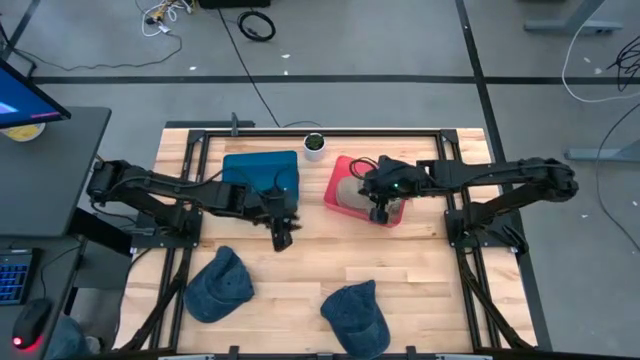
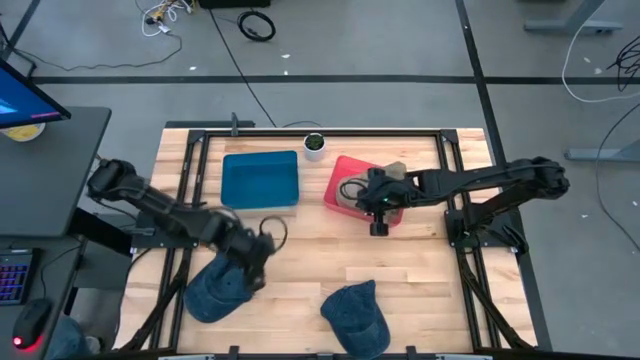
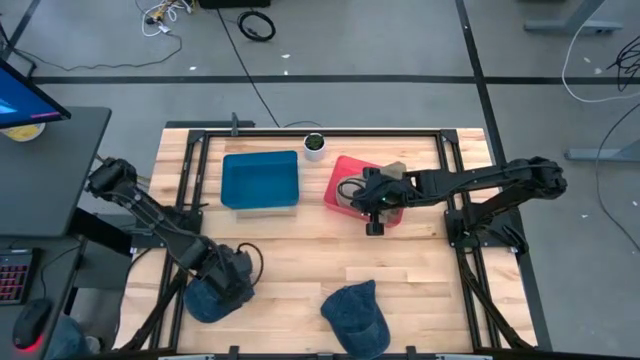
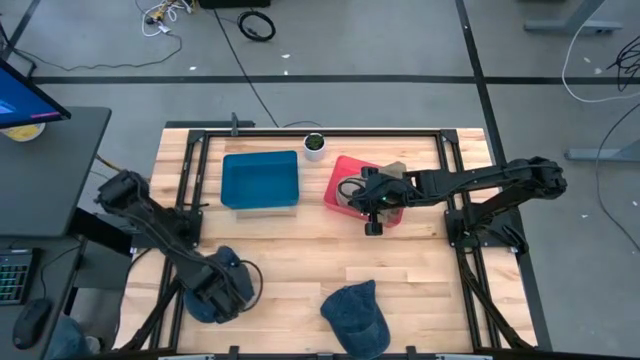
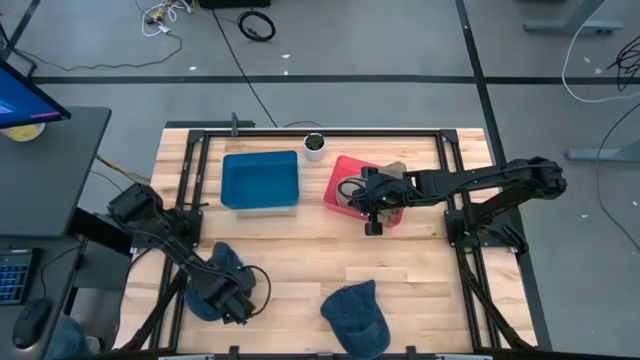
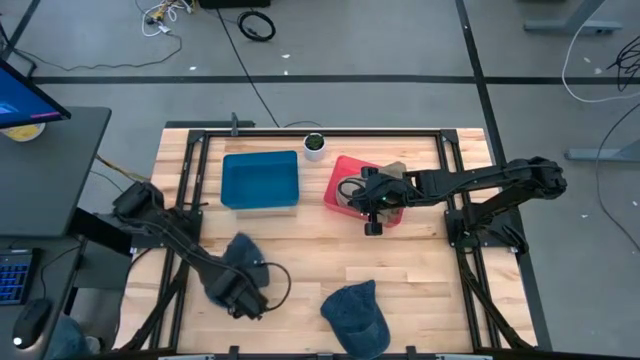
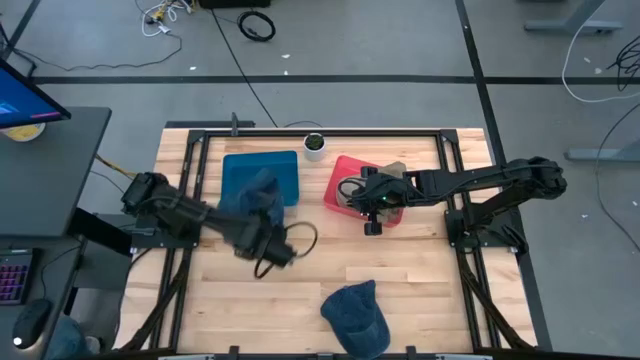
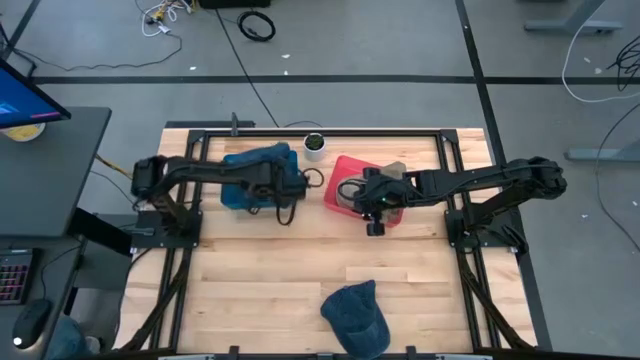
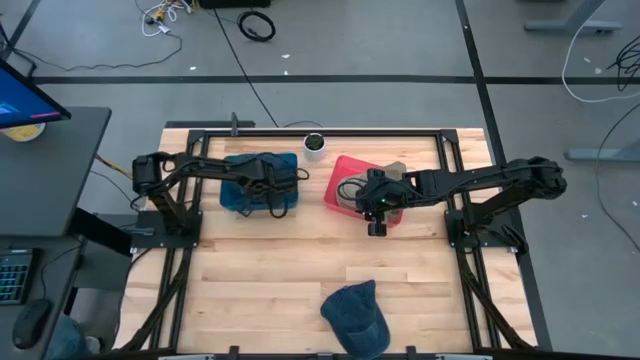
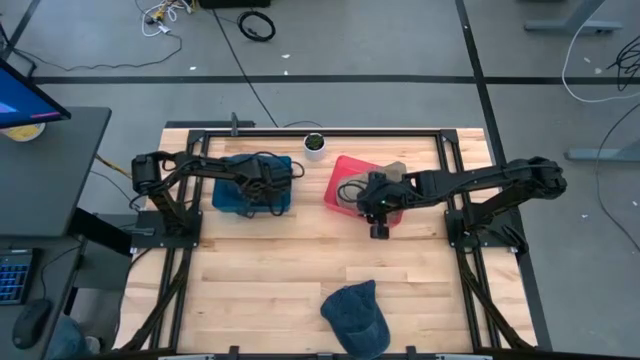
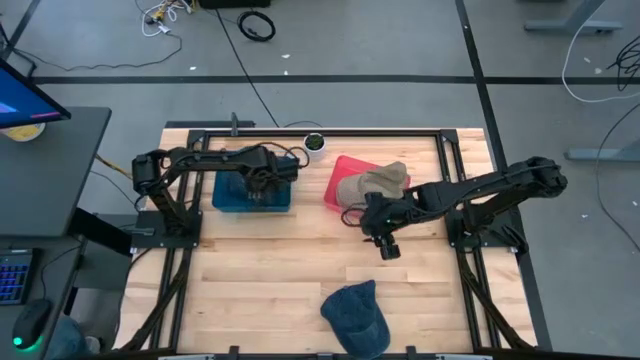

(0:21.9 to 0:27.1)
Task: Pick & Place hat
Put the left blue cap into the blue bin

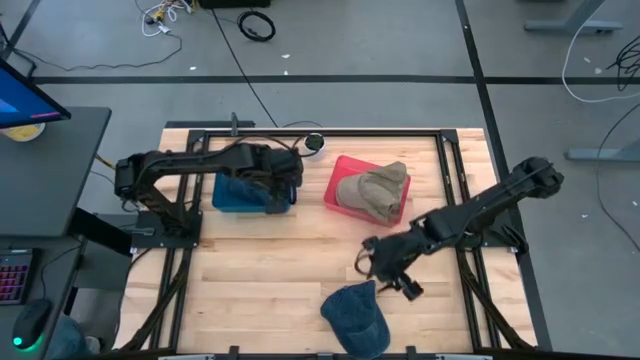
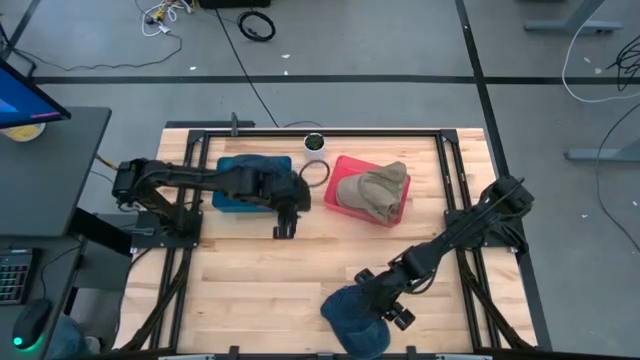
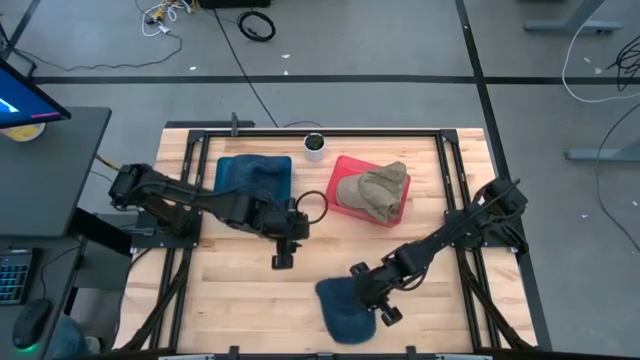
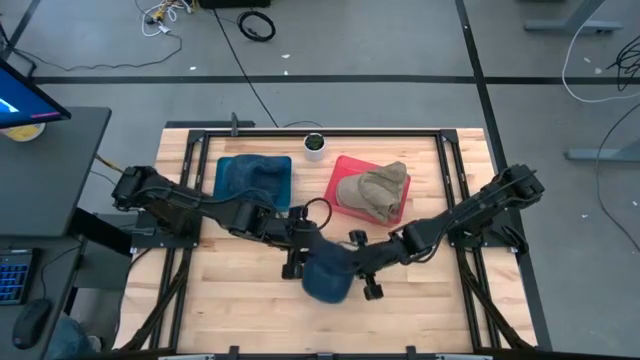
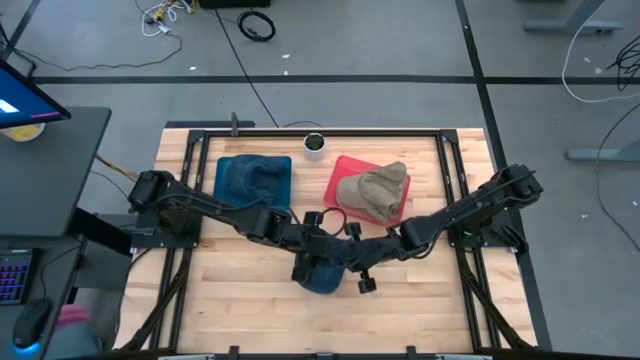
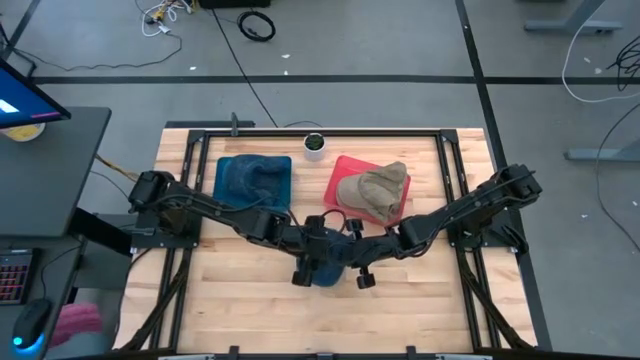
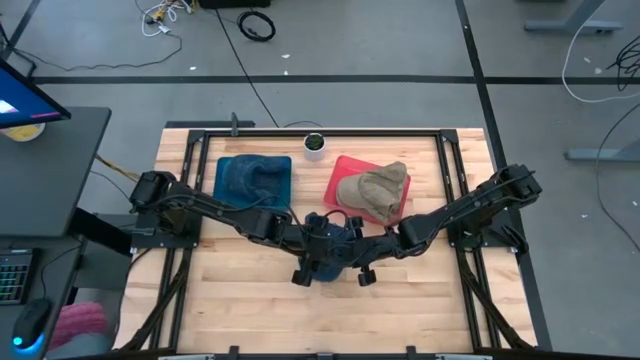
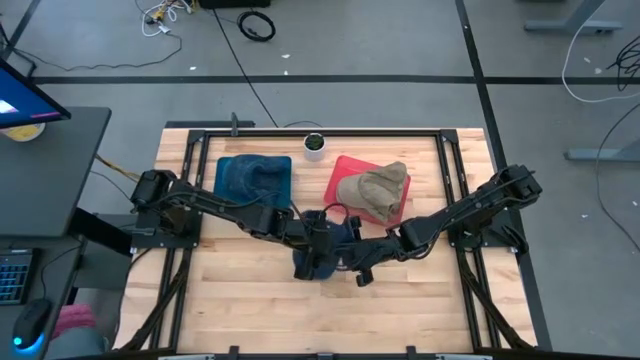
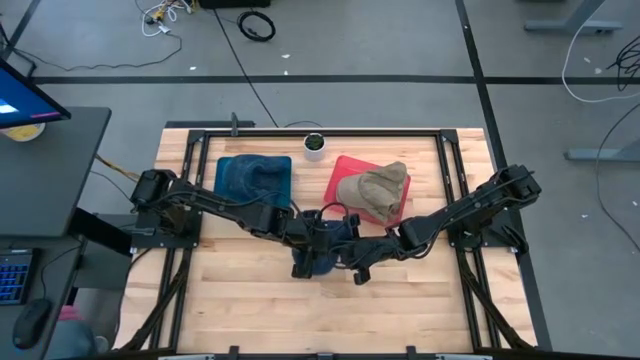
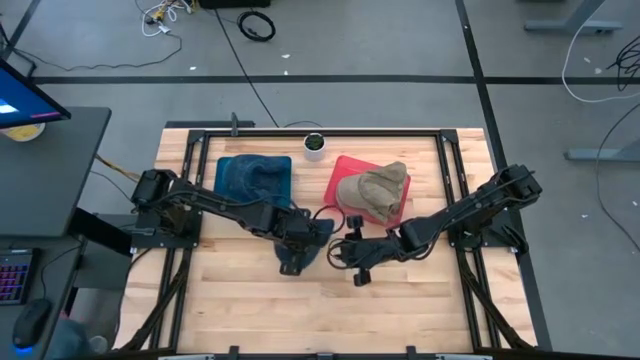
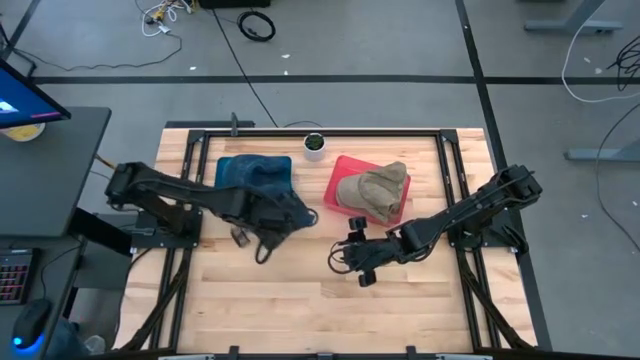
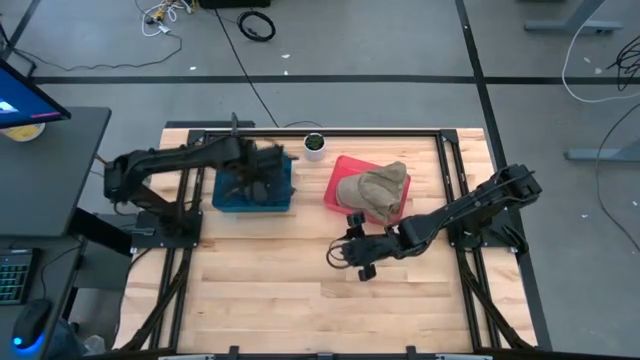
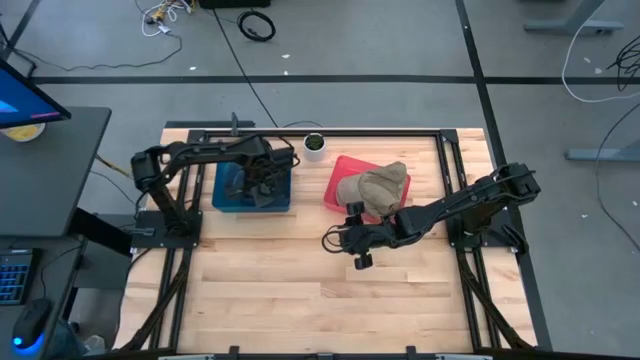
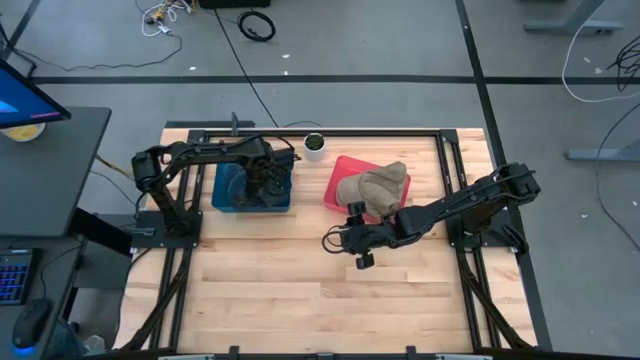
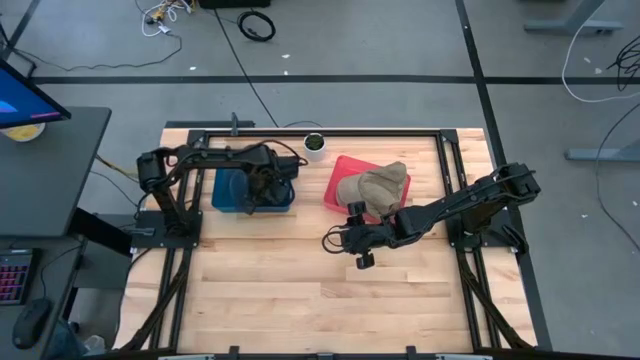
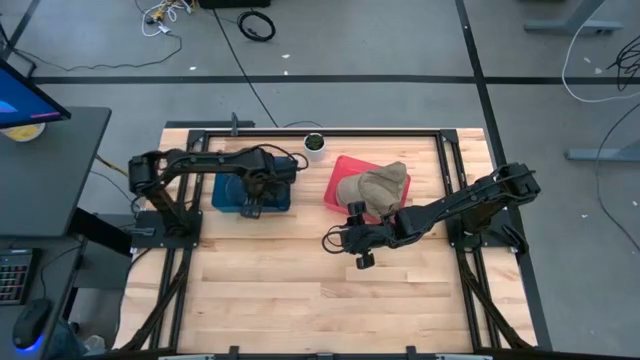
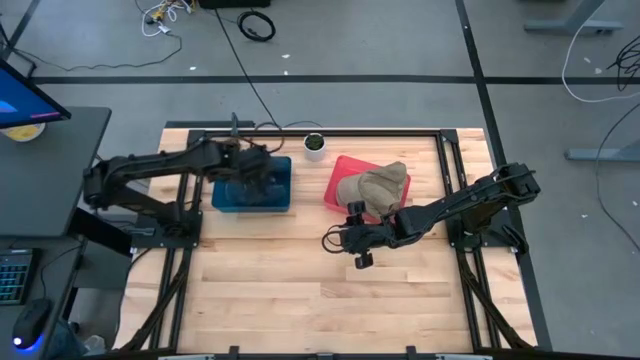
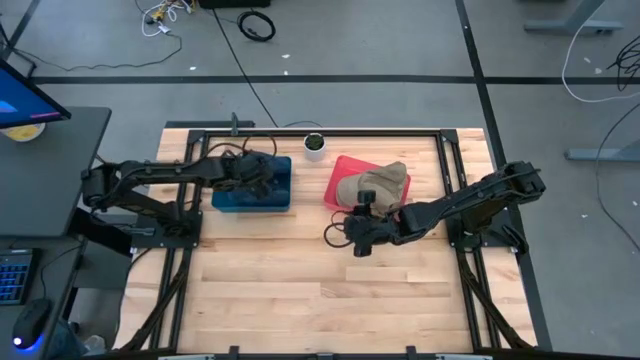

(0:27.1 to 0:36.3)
Put the blue cap into the blue bin

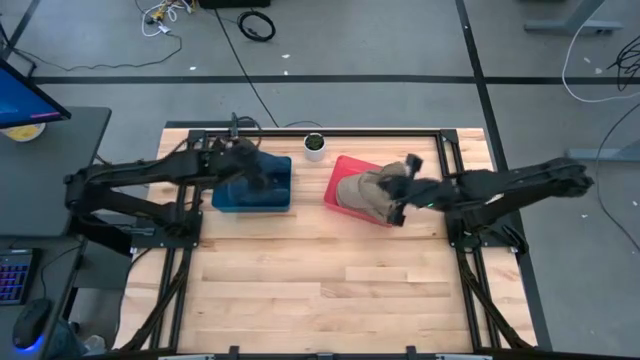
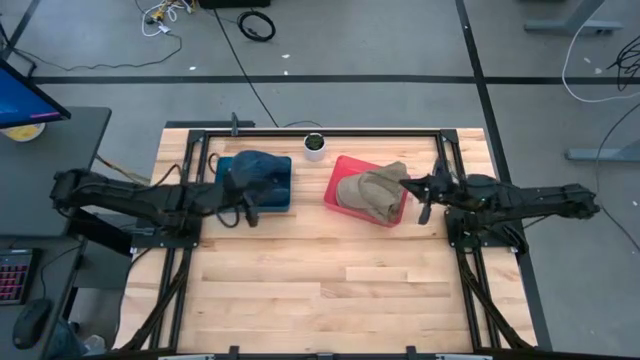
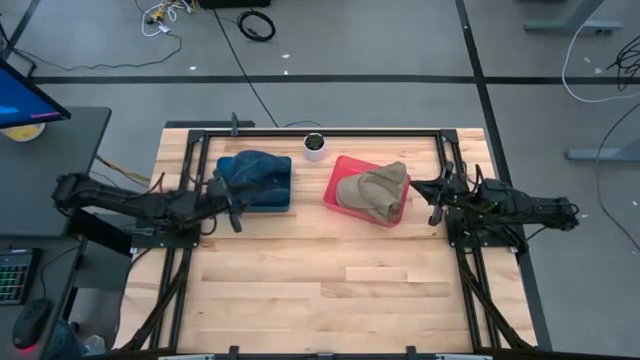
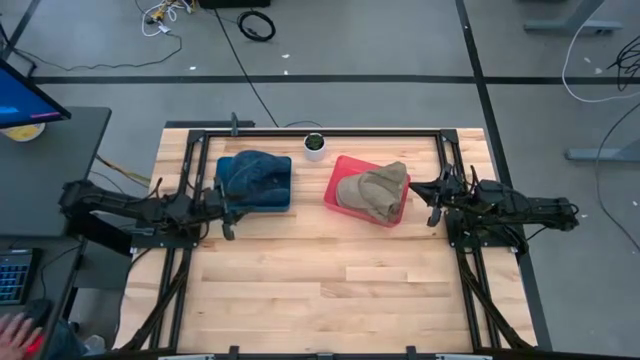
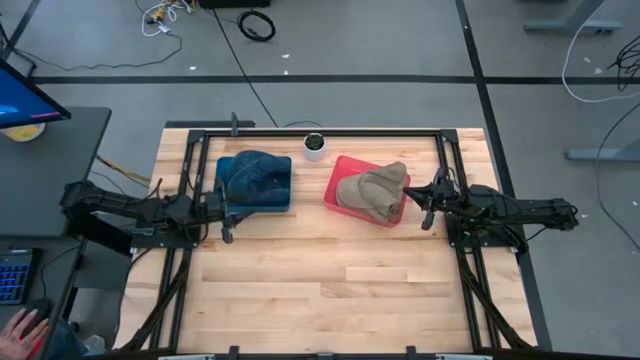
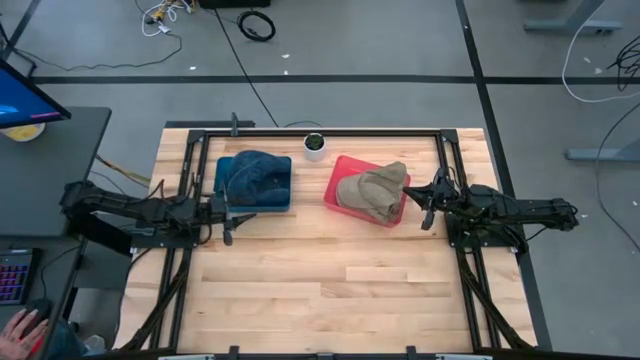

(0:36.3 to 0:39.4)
Return to Home Position

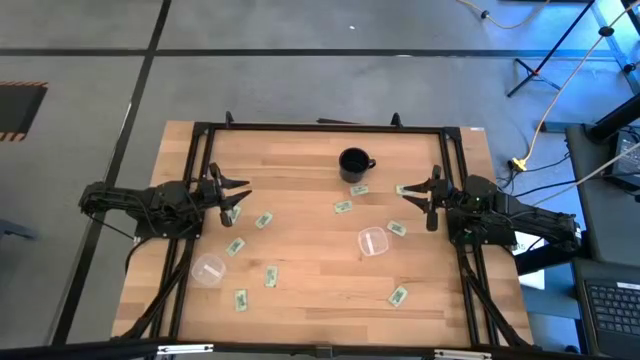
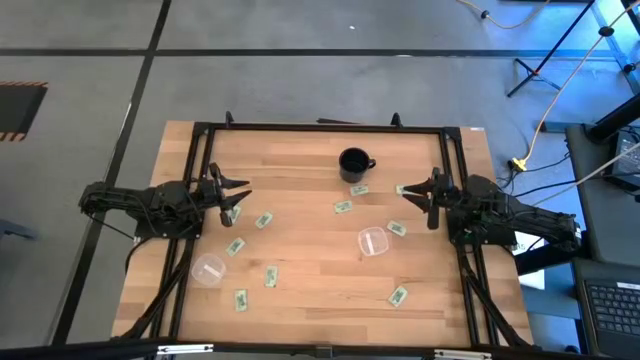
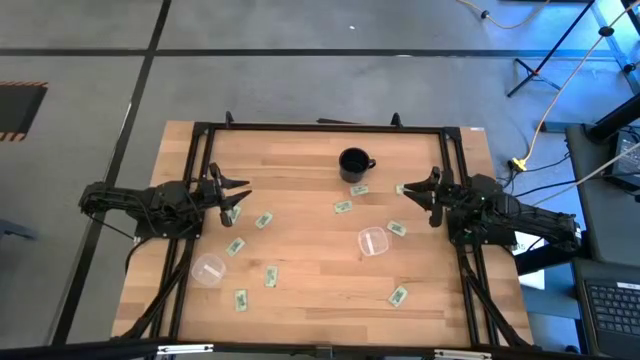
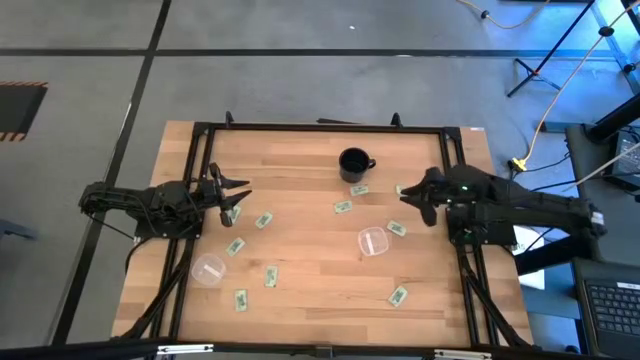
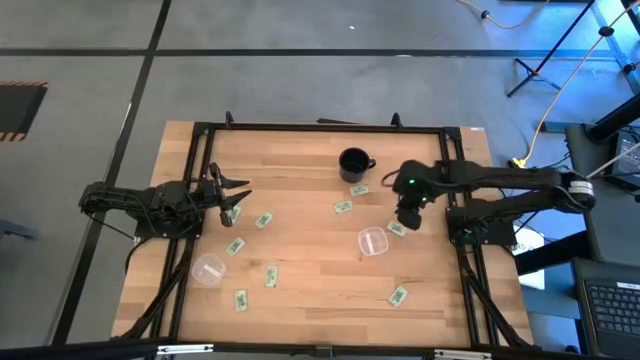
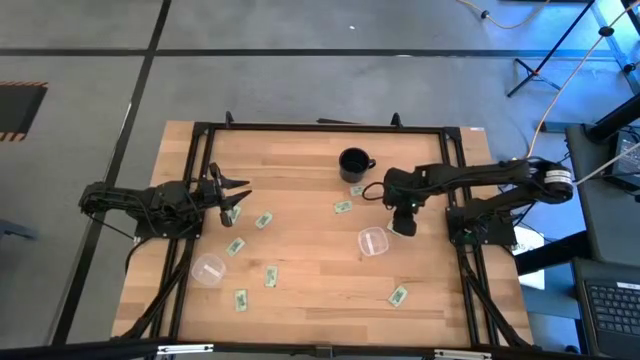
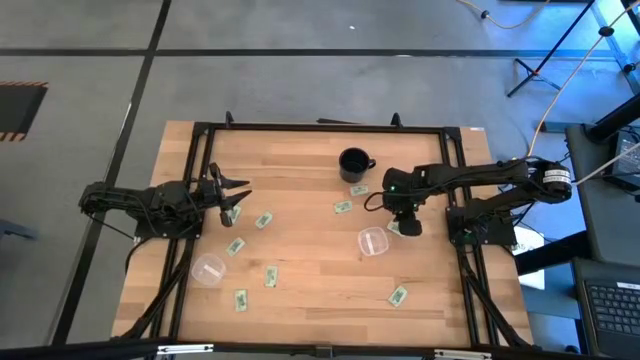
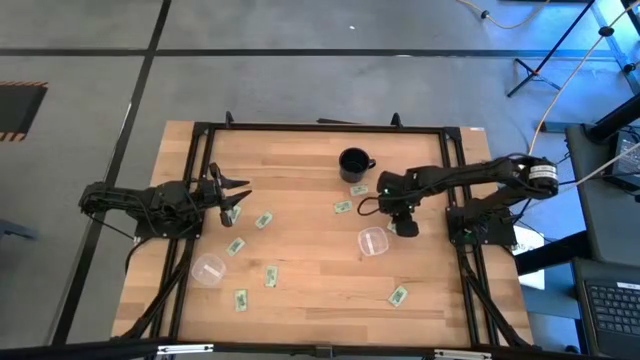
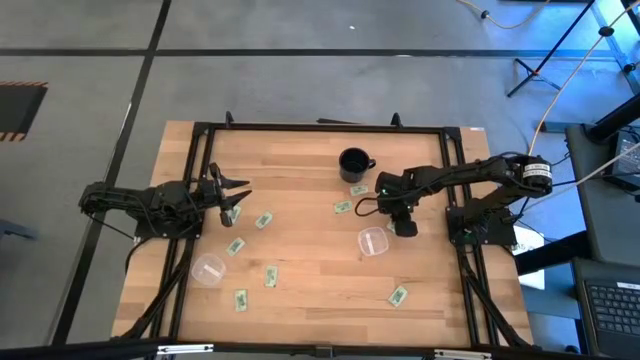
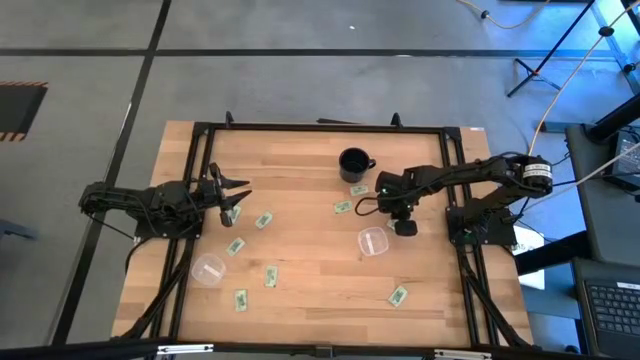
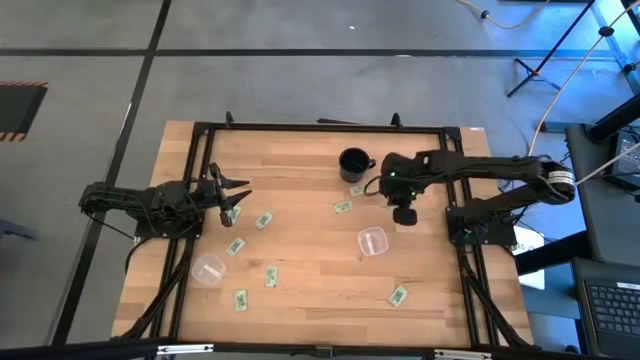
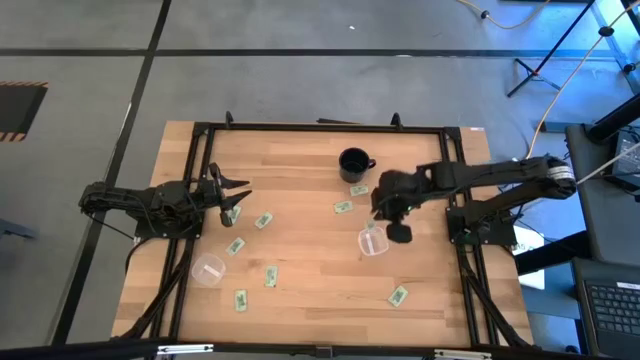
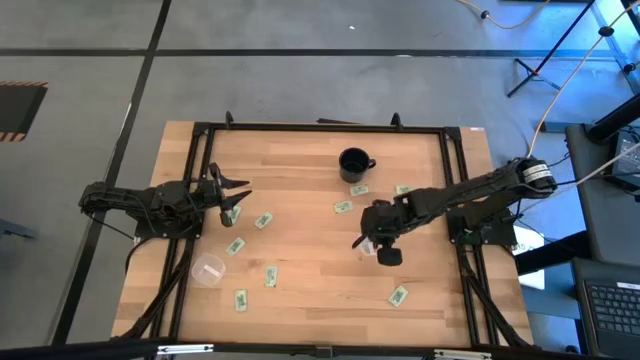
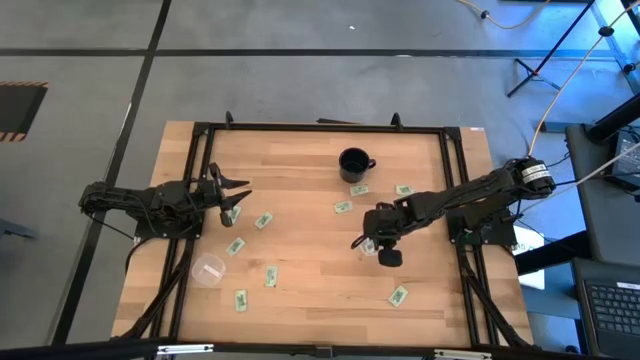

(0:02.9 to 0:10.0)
Task: Pick and place Stevia / Truvia into bins
Put the stevia packet into the right transparent container
